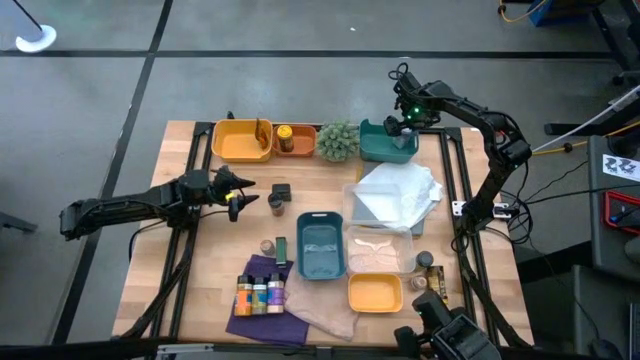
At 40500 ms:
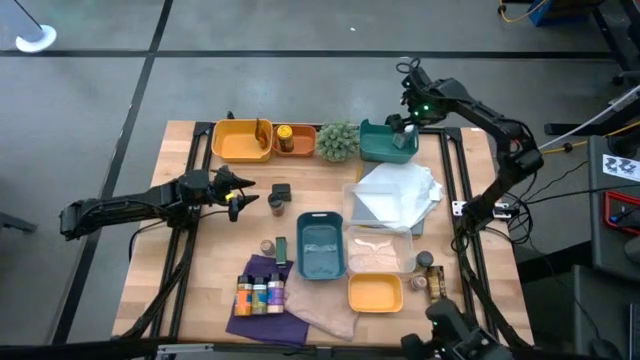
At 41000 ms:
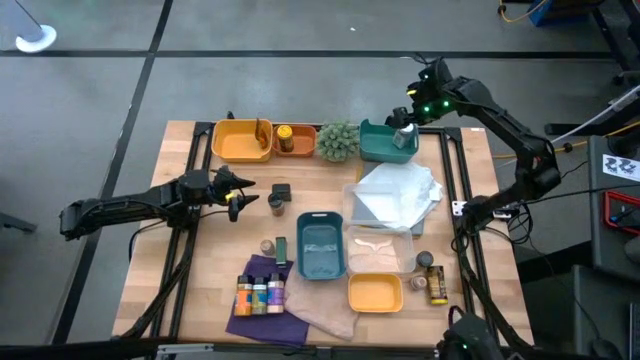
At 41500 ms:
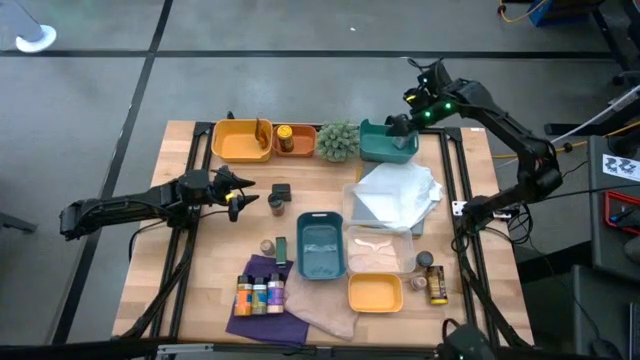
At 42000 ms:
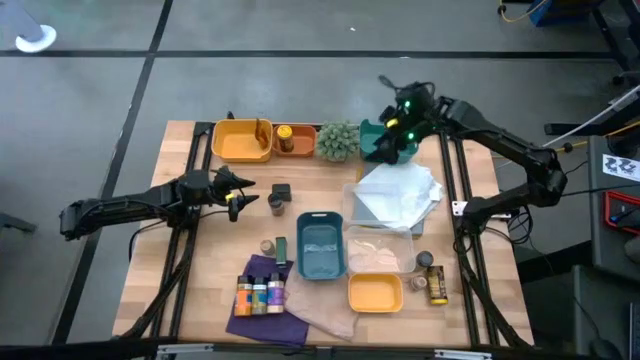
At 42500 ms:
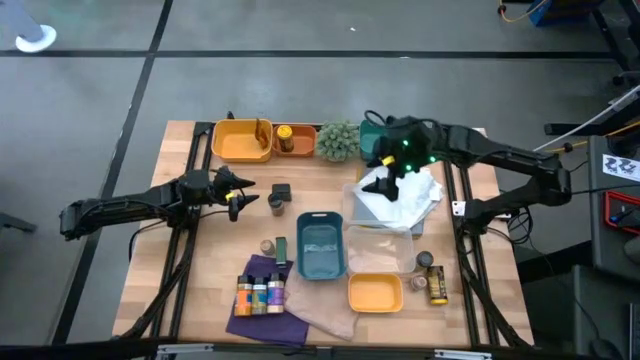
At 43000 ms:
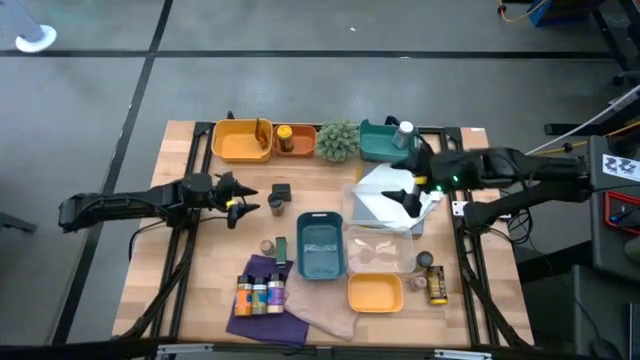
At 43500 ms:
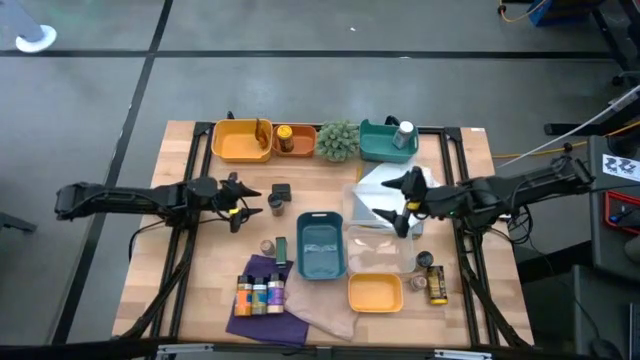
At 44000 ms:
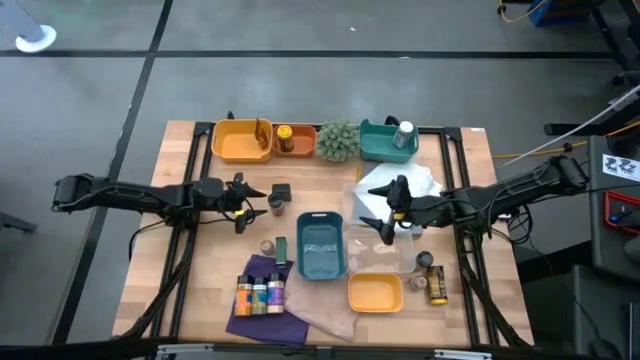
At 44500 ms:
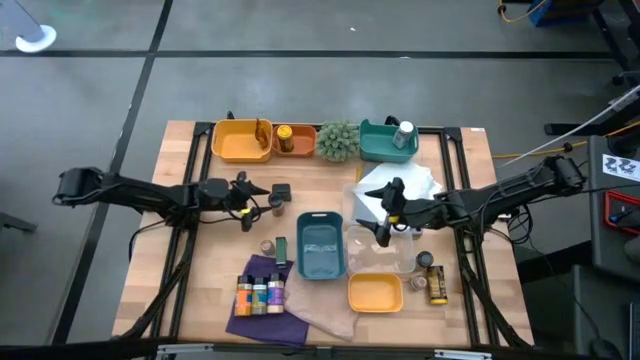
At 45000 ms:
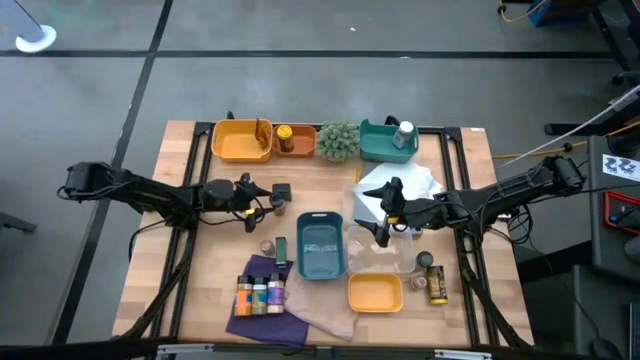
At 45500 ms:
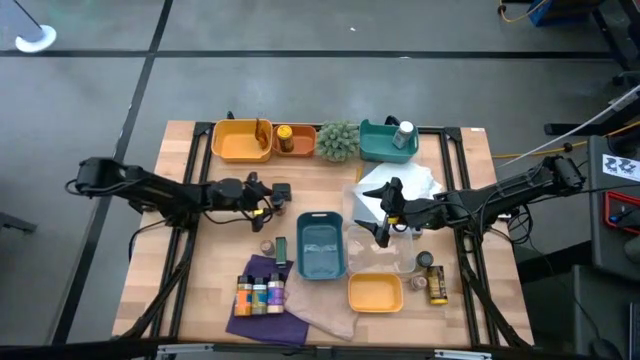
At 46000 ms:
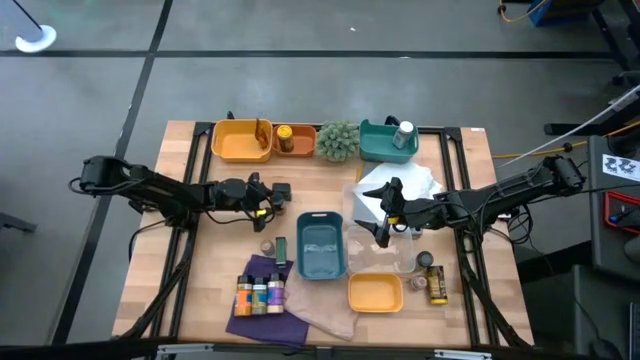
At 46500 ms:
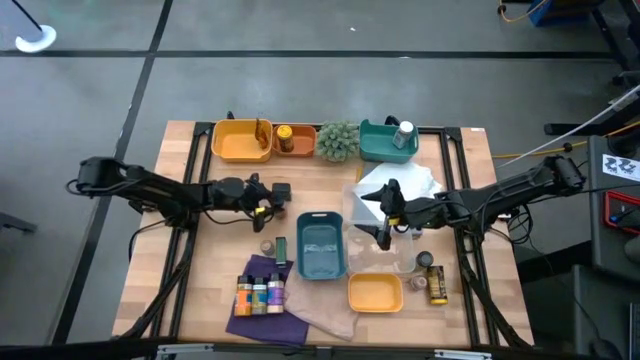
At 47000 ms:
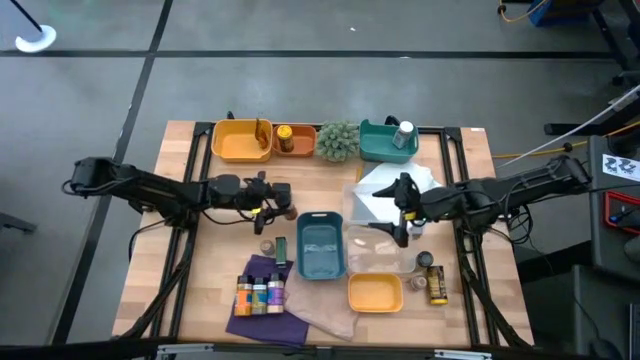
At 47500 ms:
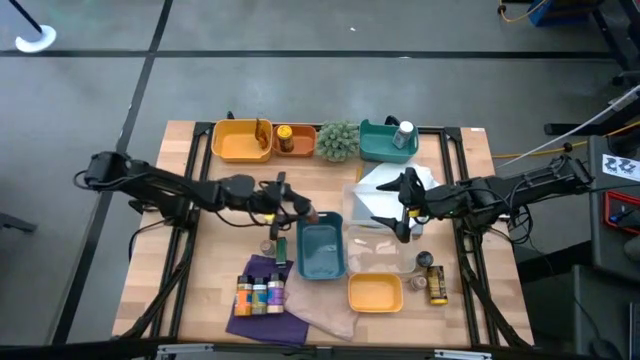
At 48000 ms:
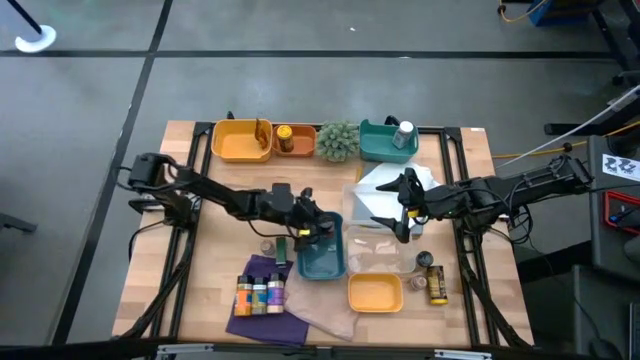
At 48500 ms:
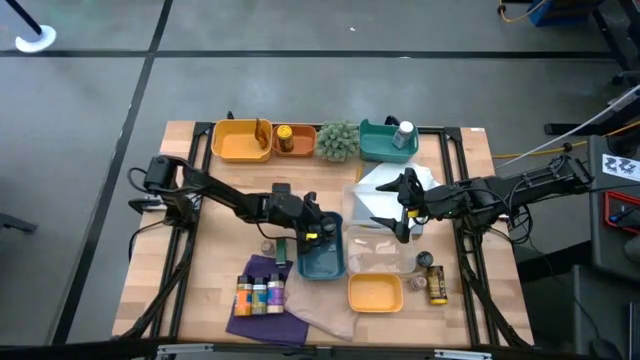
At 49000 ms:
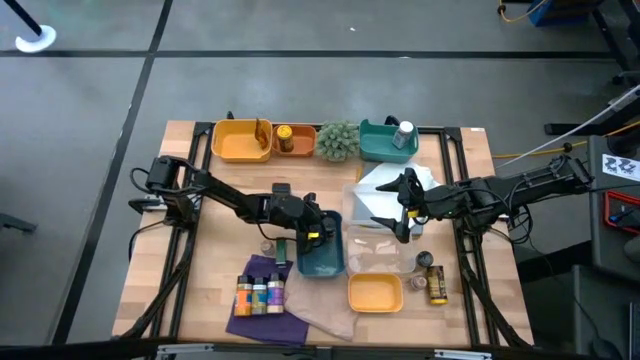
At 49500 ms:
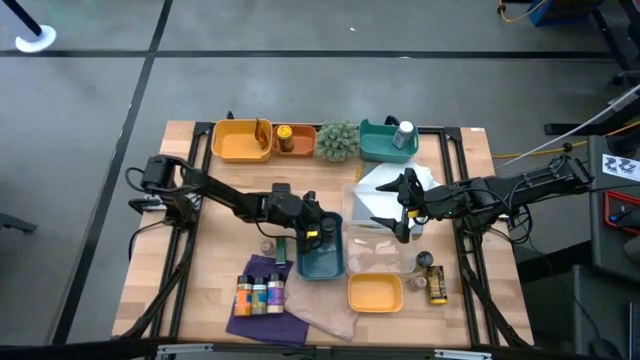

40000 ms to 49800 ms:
Task: Sort spices by type
Put the top black seasoning bottle into the blue bin

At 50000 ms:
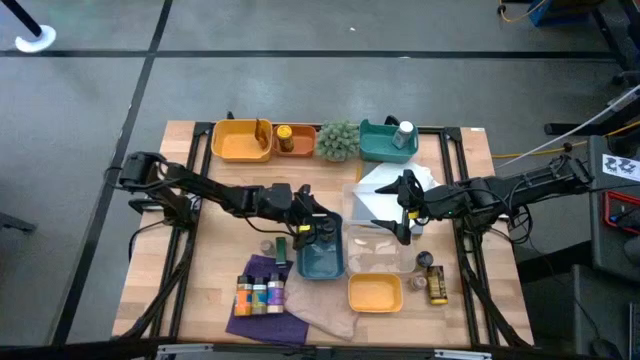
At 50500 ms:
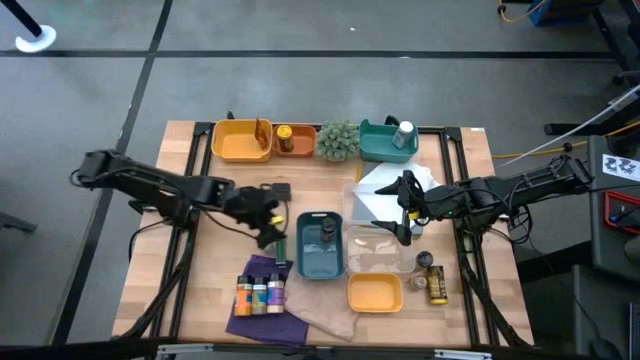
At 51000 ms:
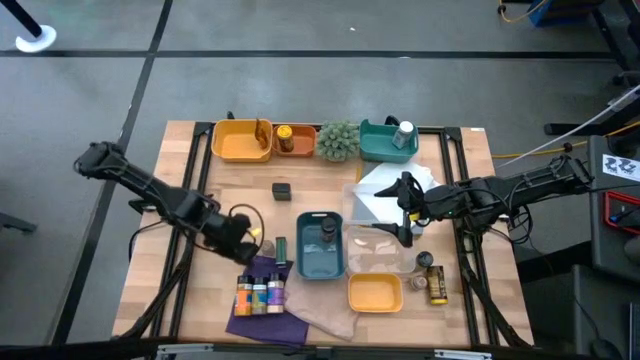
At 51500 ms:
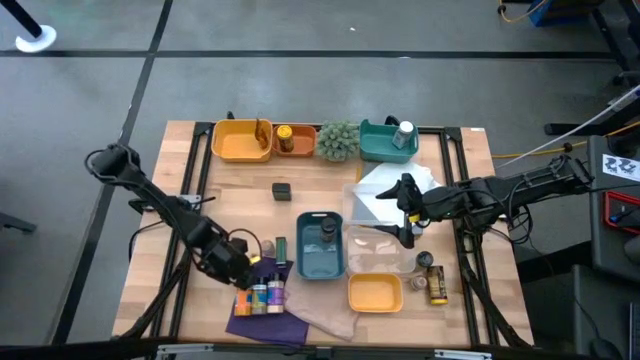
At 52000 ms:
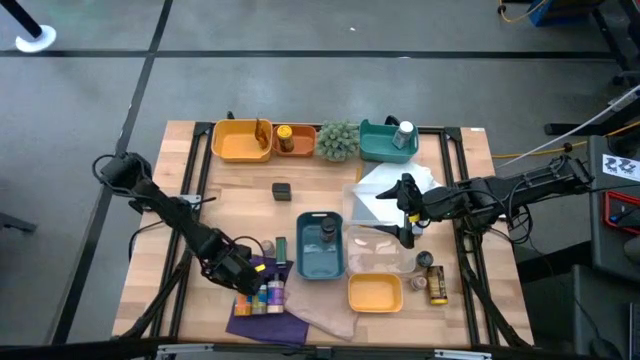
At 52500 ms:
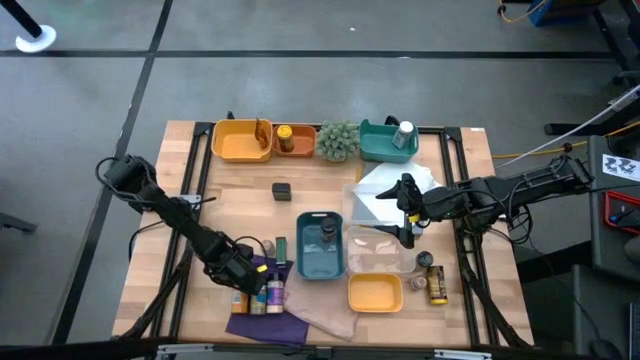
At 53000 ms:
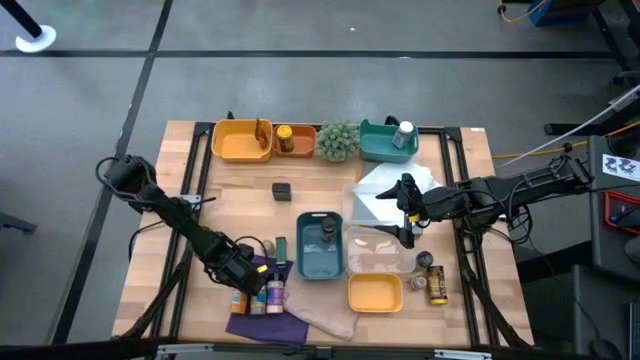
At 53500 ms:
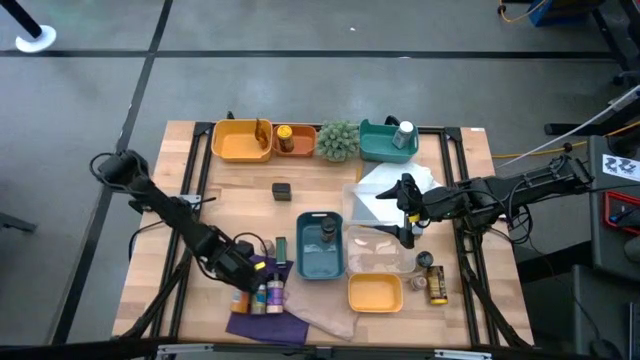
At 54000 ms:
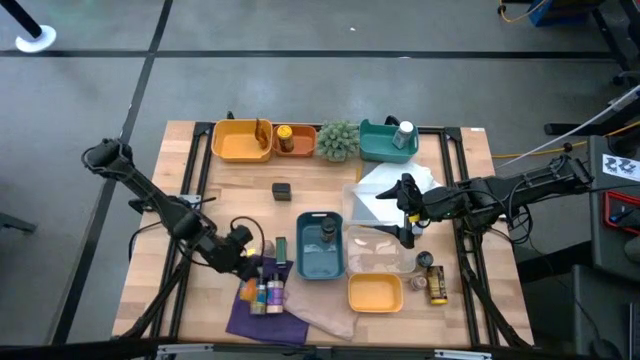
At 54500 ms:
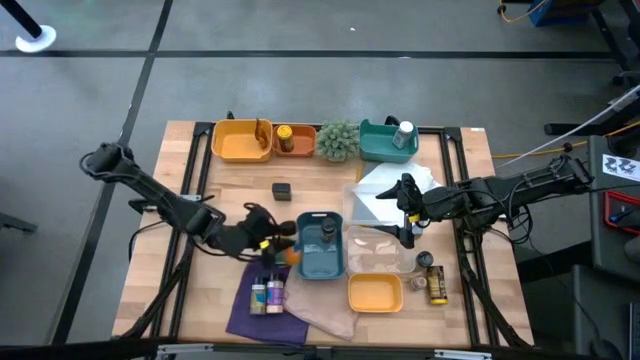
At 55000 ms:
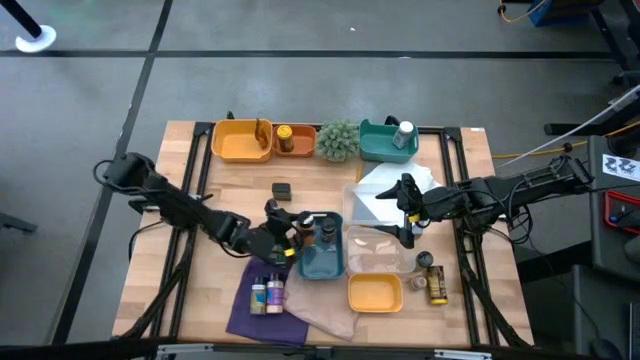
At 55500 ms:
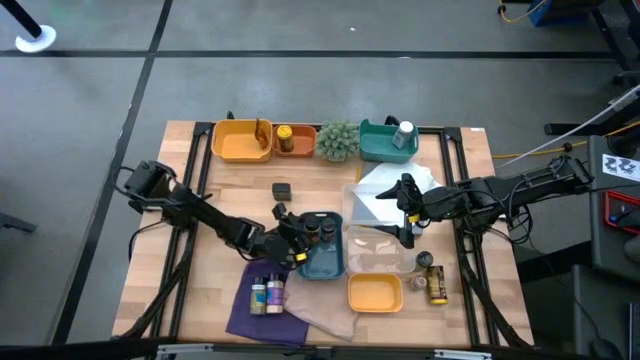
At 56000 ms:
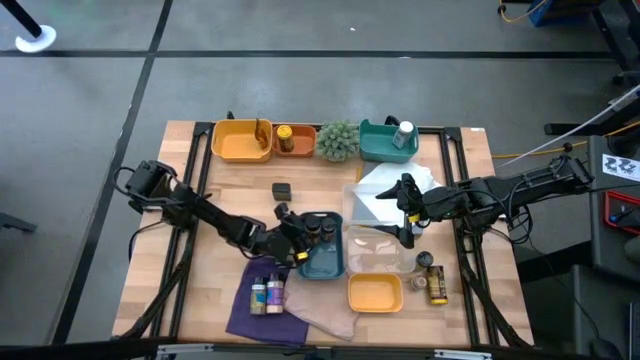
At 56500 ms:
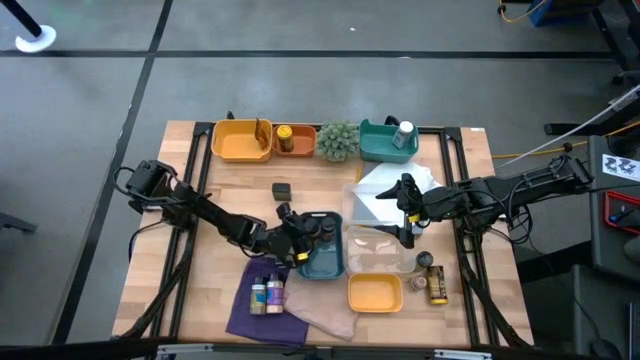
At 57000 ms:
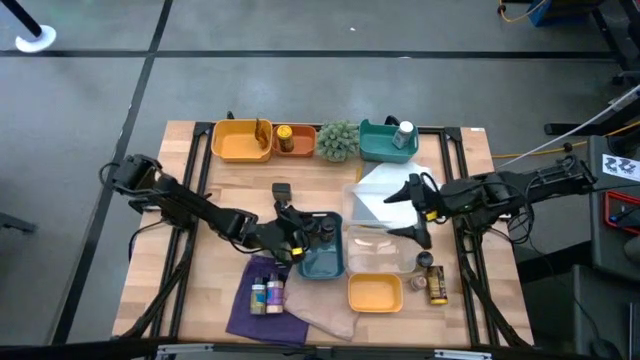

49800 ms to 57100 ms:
Put the left black seasoning bottle into the blue bin

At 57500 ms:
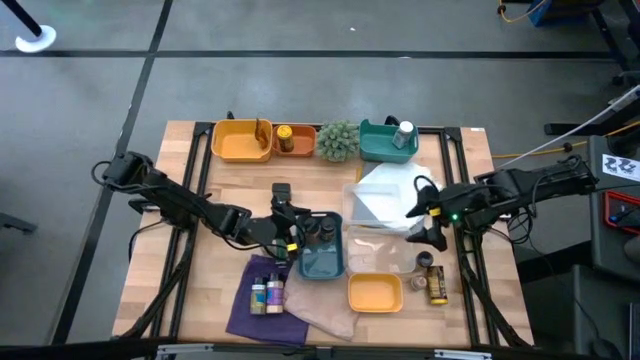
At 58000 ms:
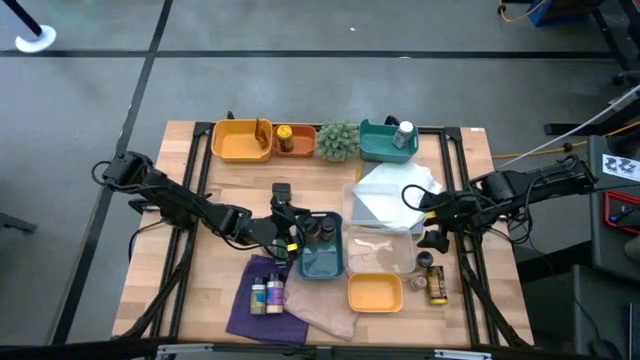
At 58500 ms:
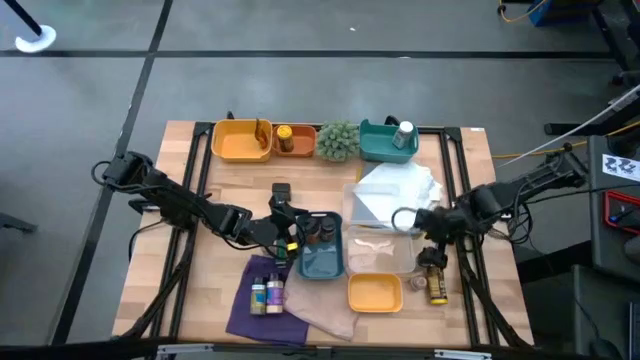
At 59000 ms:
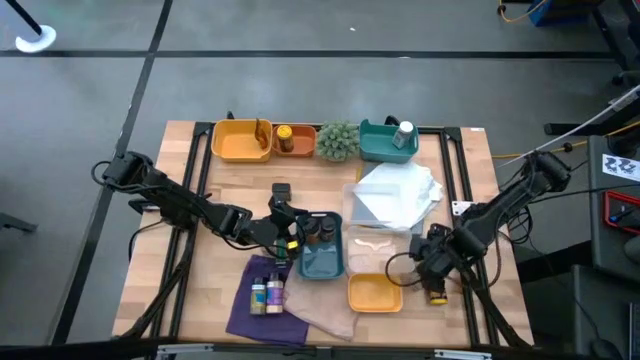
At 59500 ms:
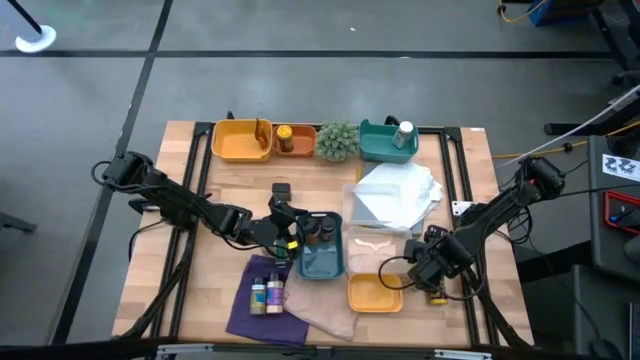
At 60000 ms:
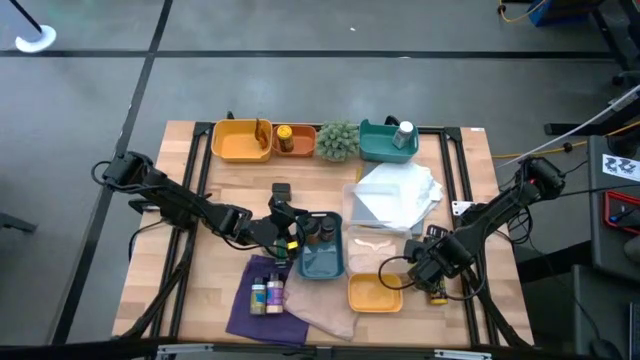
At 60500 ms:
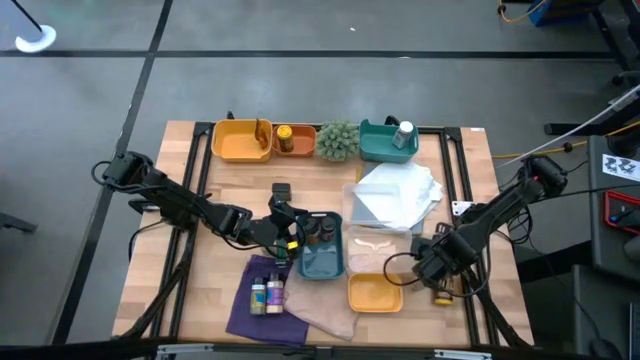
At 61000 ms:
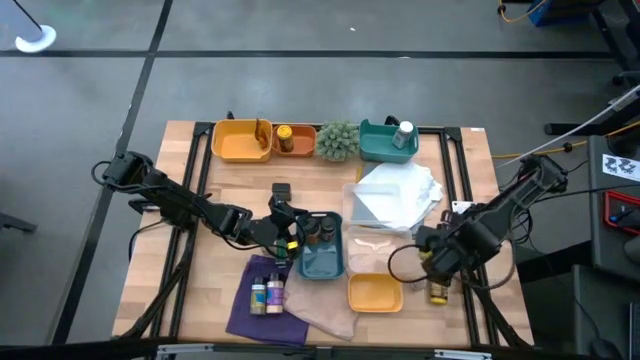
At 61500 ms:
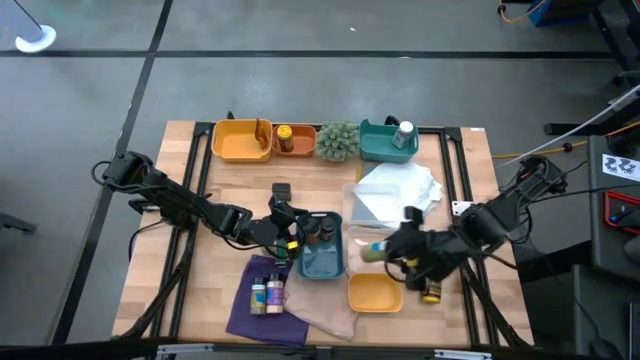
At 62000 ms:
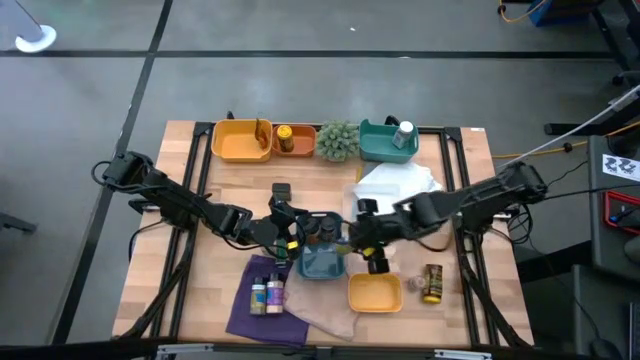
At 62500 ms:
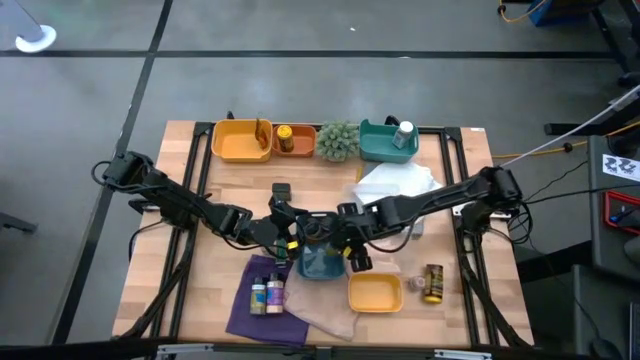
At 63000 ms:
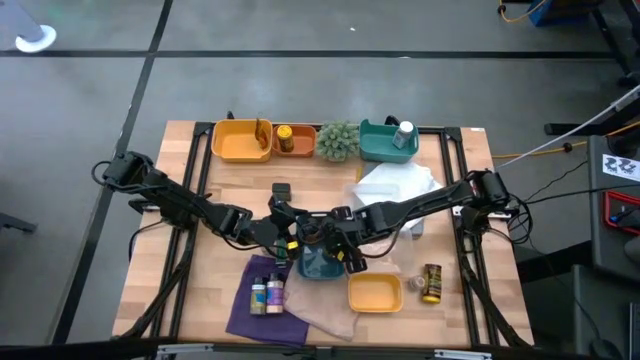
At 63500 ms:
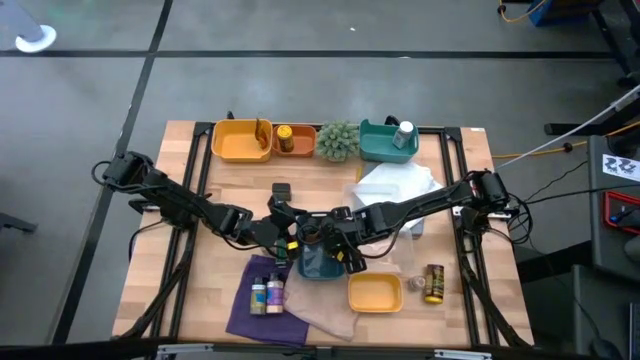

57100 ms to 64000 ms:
Put the right black seasoning bottle into the blue bin
